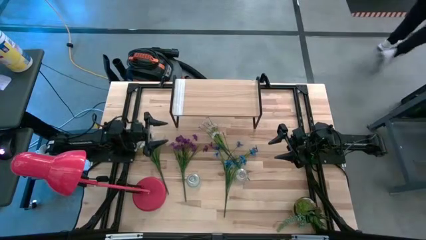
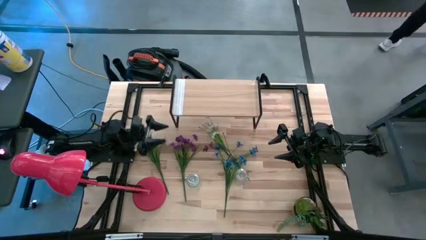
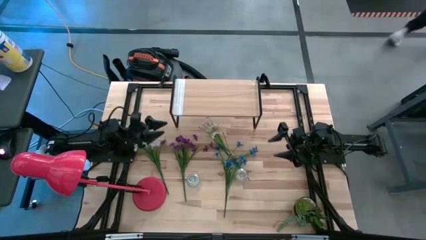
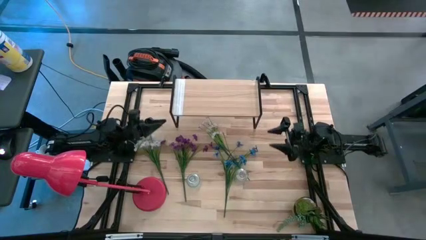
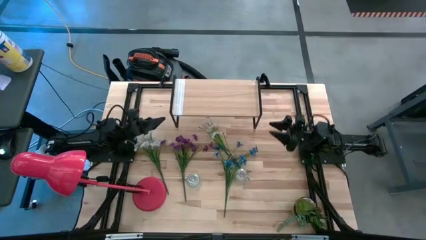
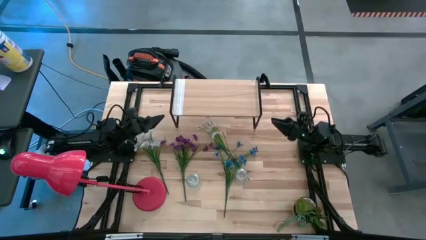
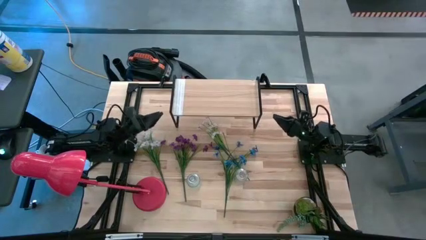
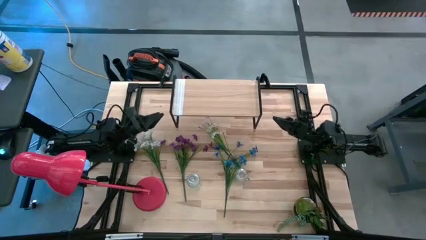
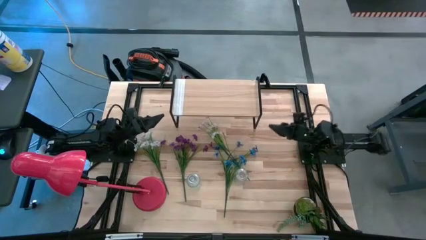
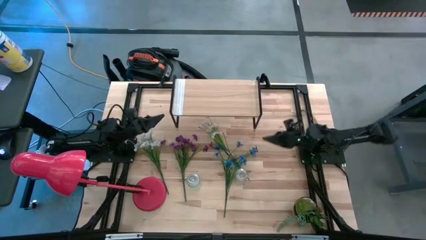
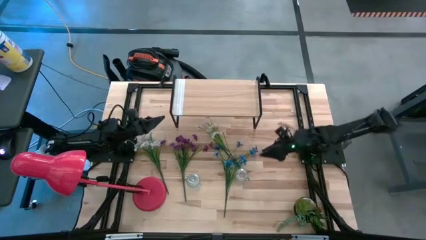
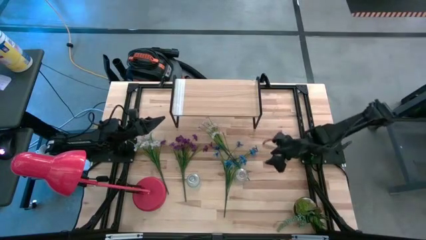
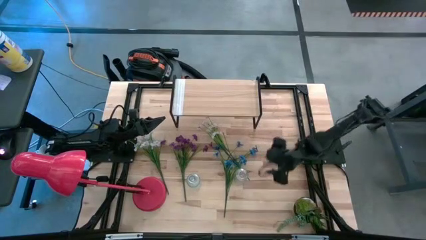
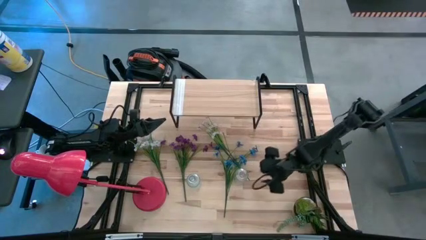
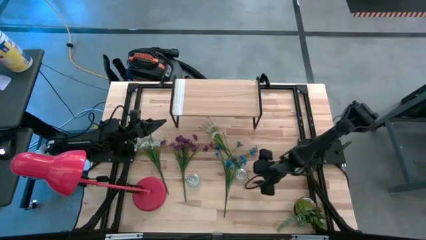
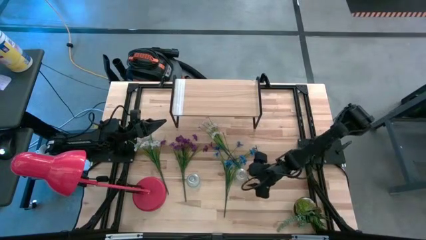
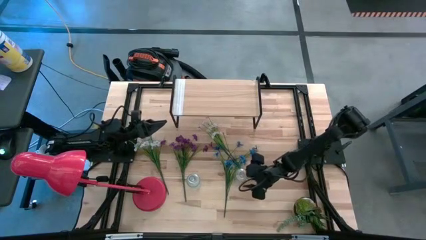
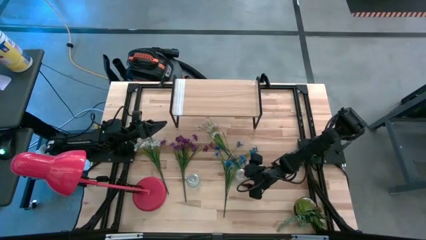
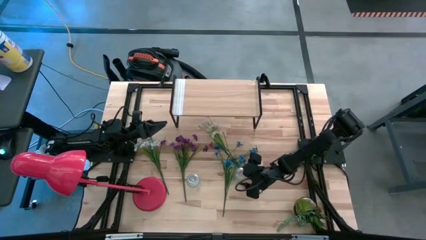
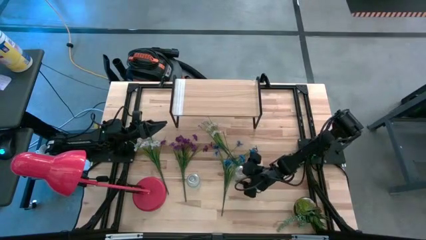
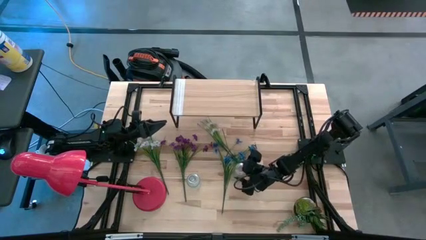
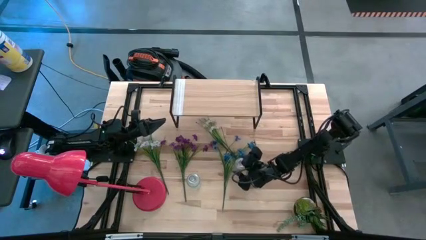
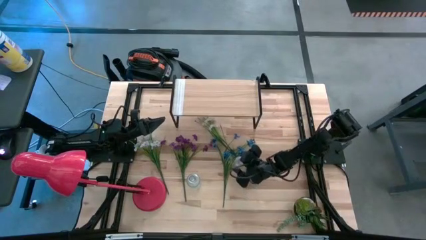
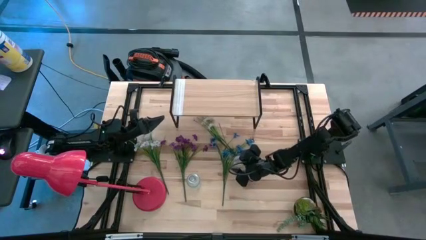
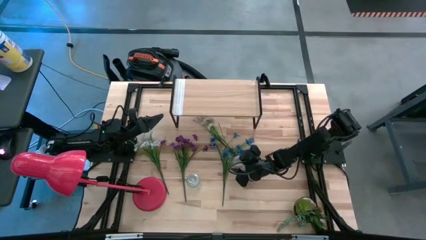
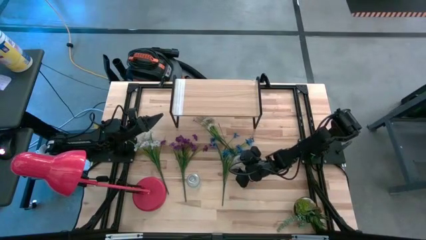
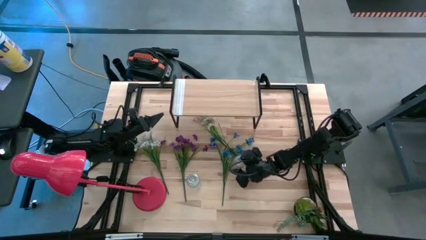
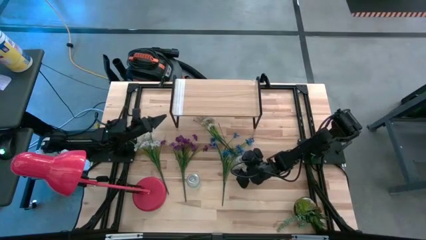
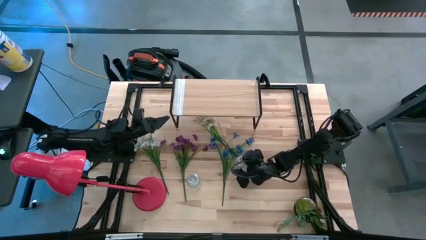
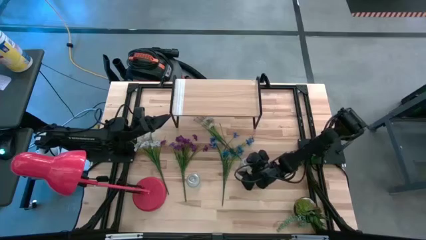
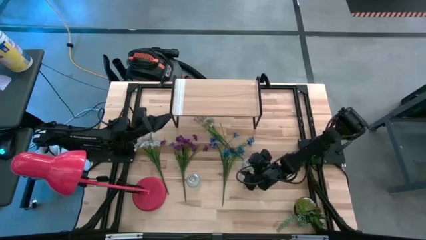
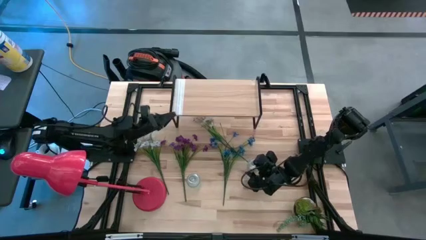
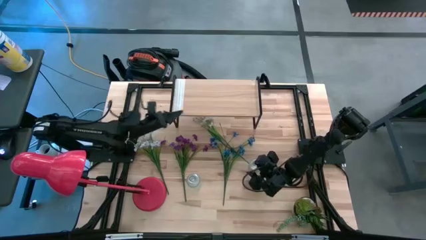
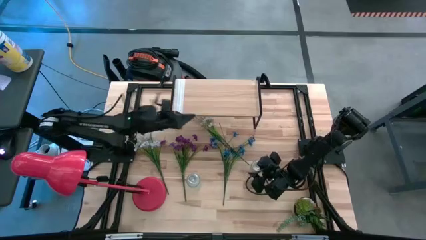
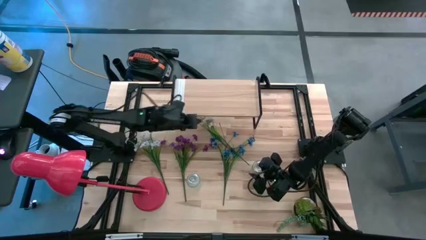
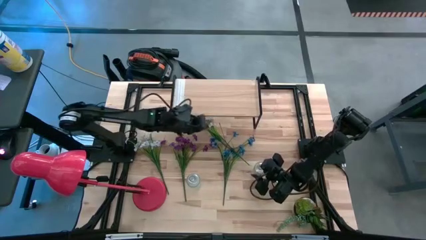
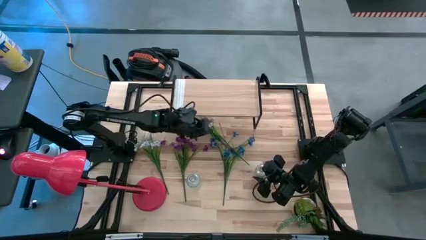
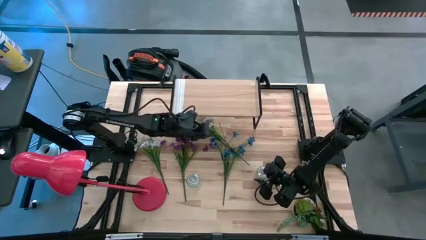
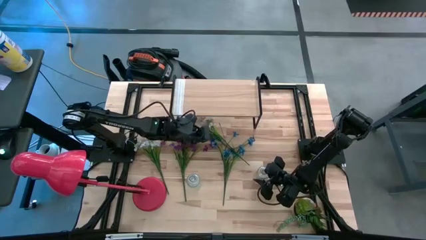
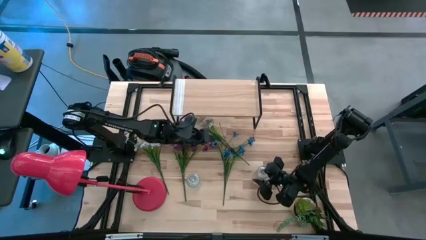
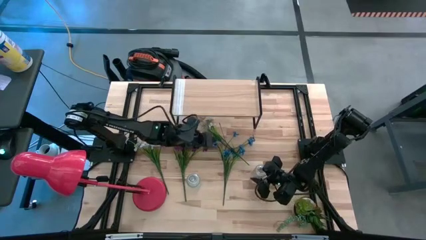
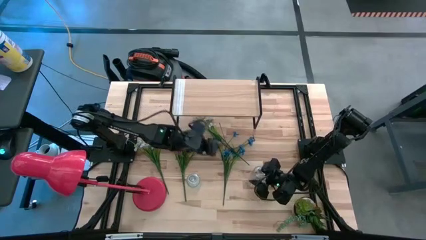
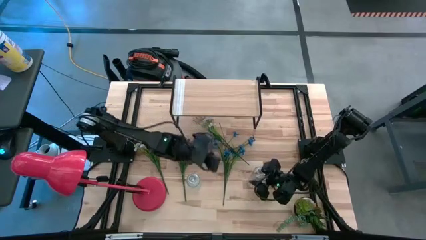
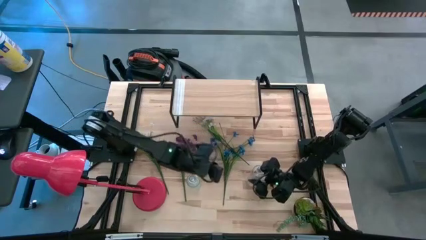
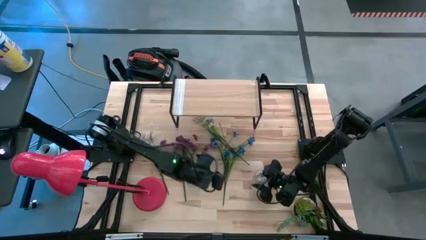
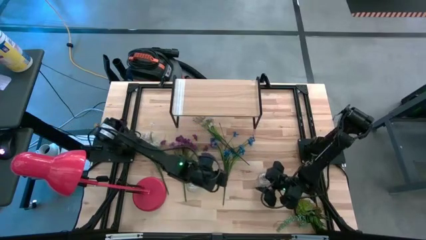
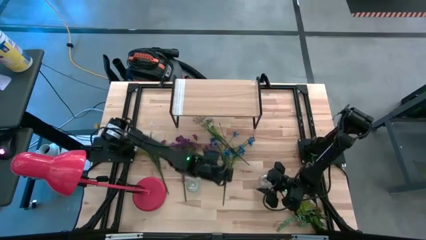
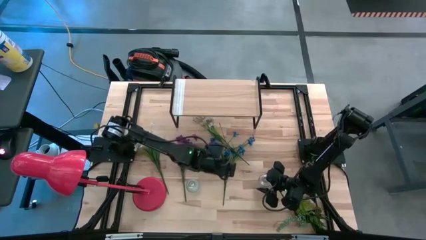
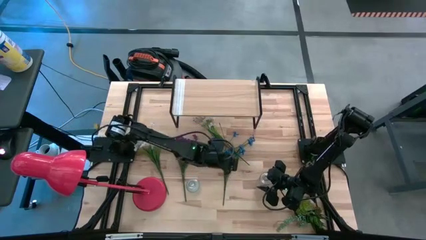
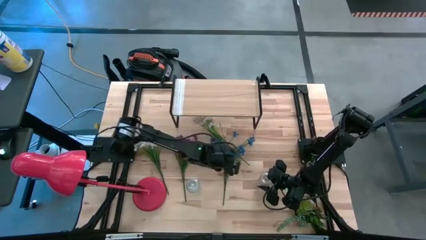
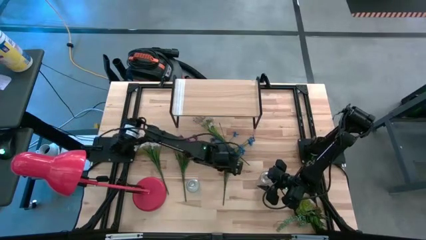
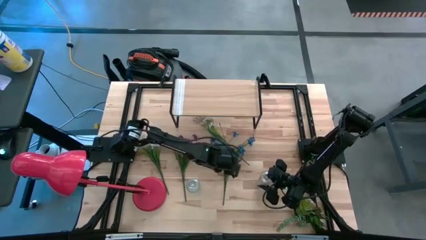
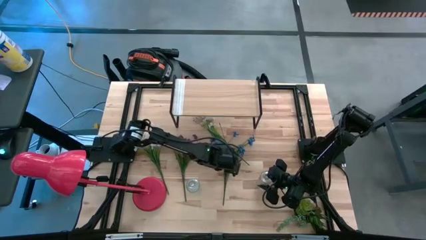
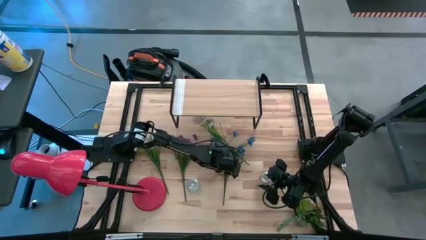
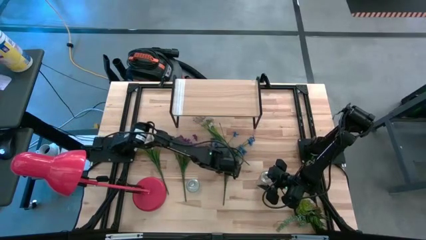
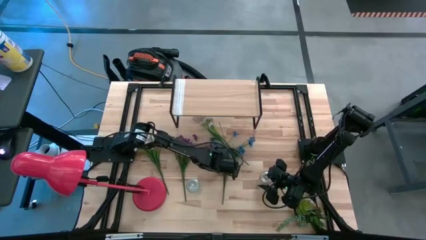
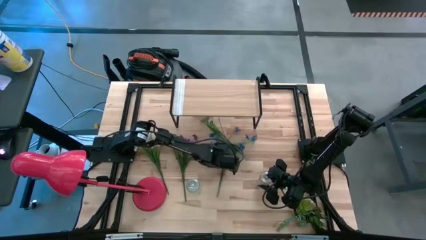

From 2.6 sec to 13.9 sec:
Task: Pick and place flowers into a vace then onto a shelf
Put the blue flowers into the right transparent vase
